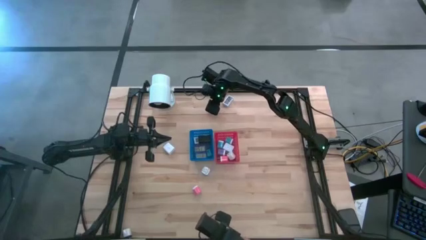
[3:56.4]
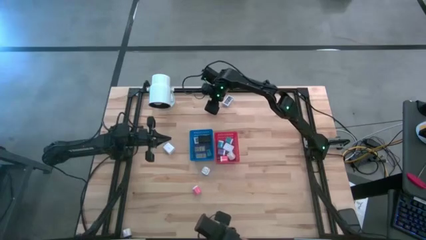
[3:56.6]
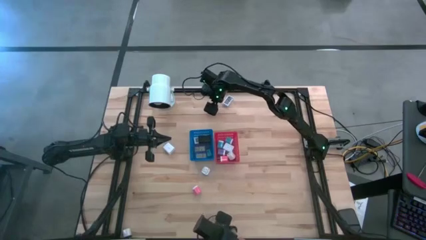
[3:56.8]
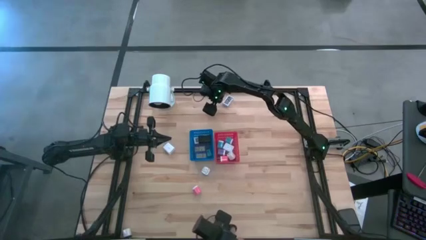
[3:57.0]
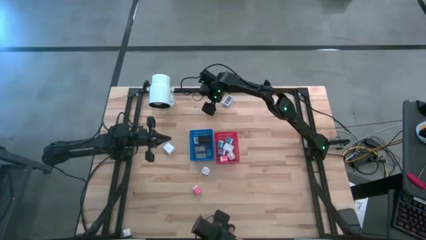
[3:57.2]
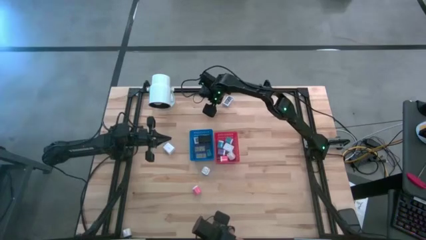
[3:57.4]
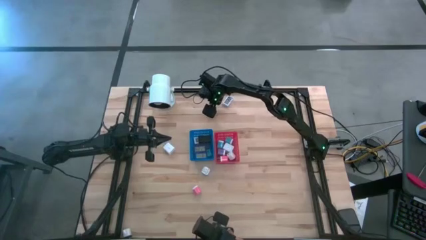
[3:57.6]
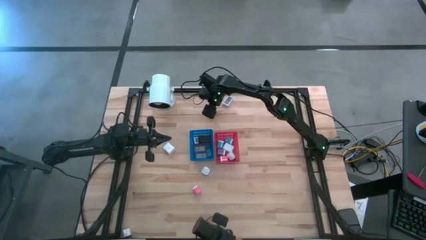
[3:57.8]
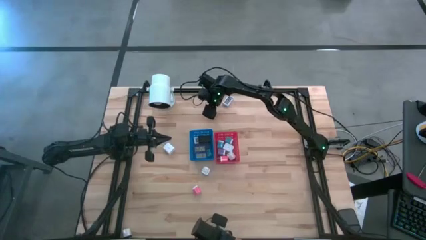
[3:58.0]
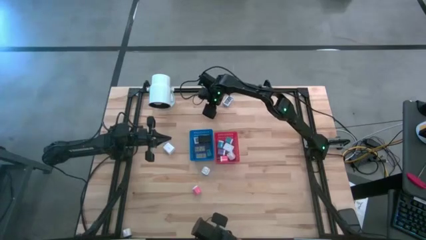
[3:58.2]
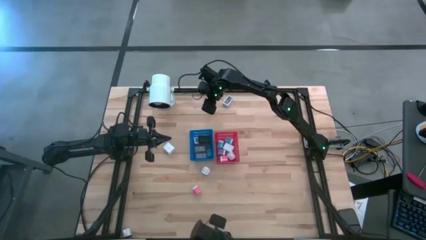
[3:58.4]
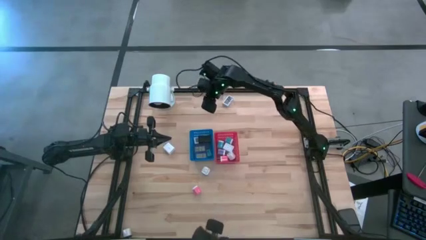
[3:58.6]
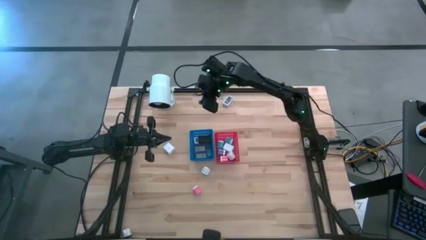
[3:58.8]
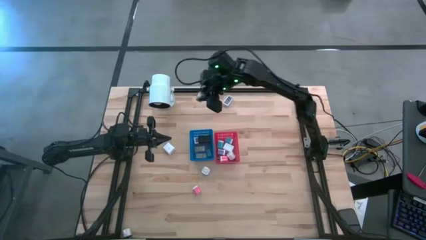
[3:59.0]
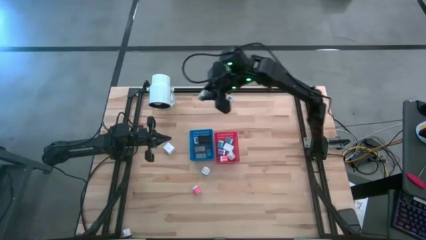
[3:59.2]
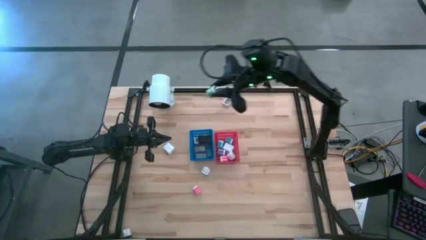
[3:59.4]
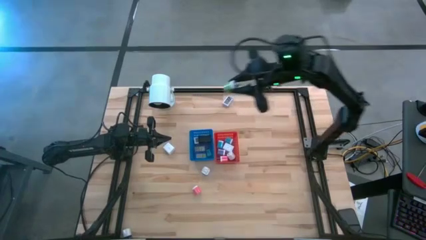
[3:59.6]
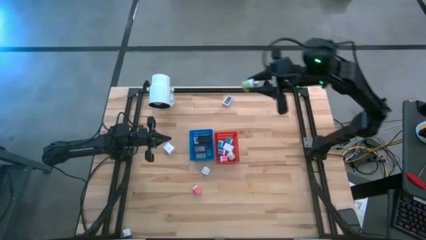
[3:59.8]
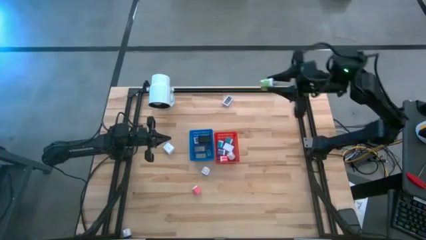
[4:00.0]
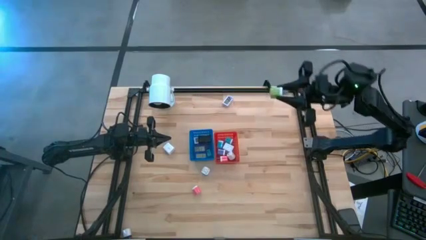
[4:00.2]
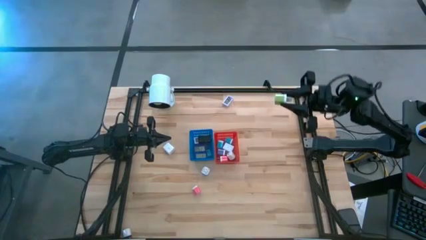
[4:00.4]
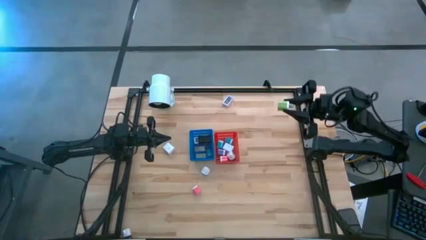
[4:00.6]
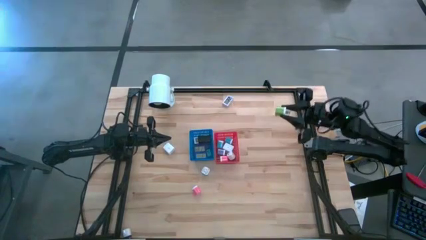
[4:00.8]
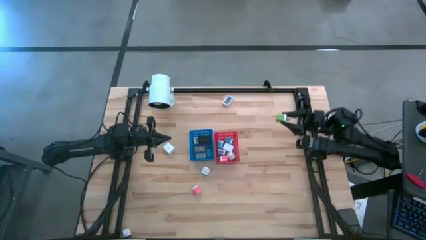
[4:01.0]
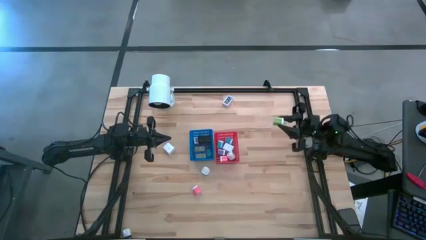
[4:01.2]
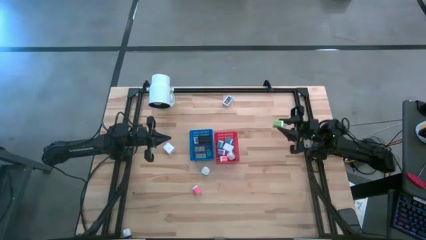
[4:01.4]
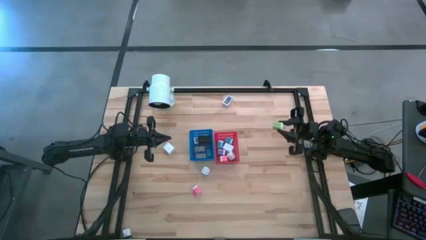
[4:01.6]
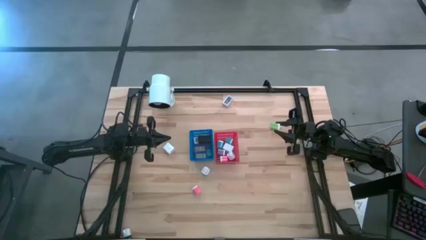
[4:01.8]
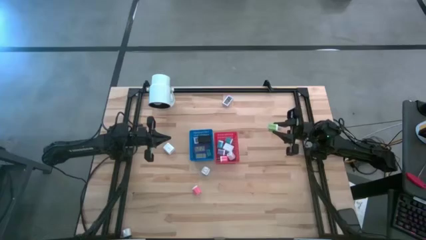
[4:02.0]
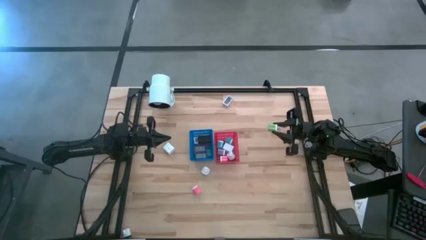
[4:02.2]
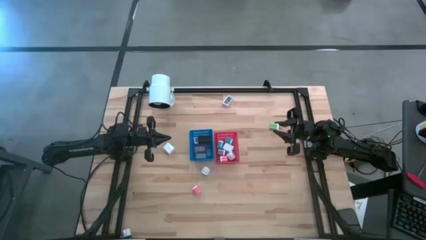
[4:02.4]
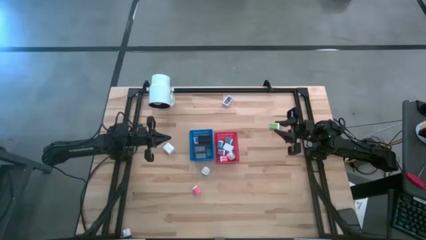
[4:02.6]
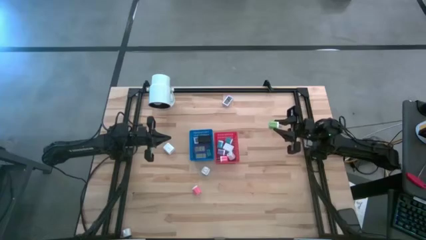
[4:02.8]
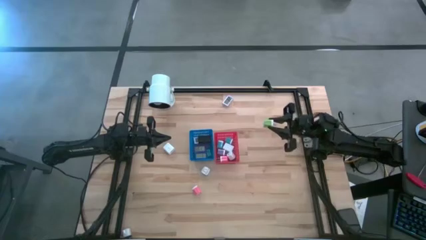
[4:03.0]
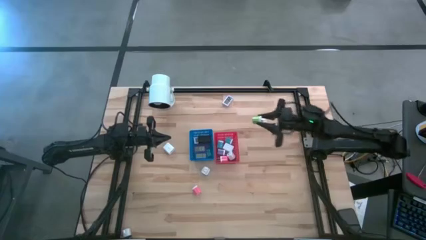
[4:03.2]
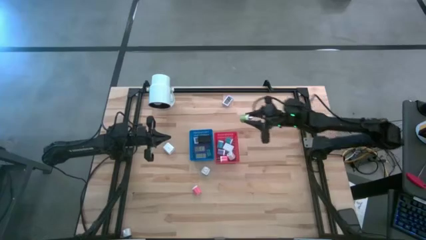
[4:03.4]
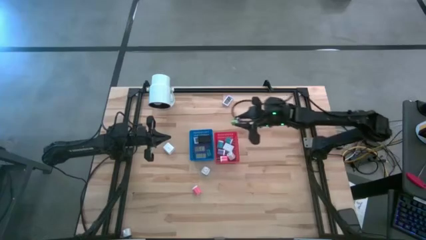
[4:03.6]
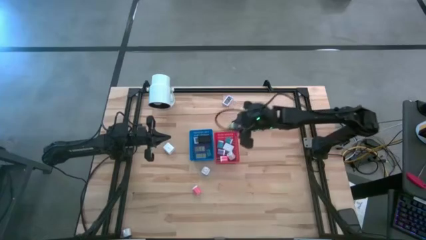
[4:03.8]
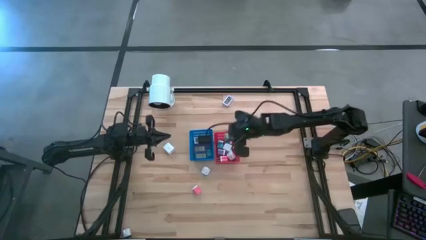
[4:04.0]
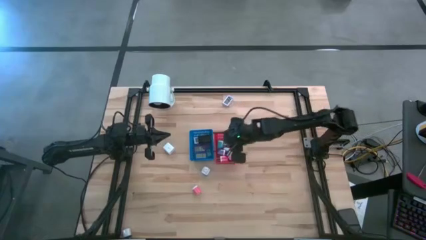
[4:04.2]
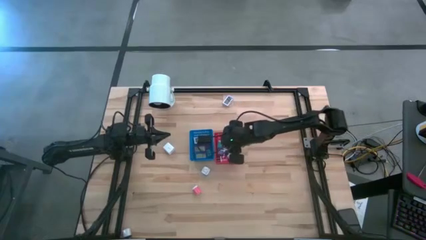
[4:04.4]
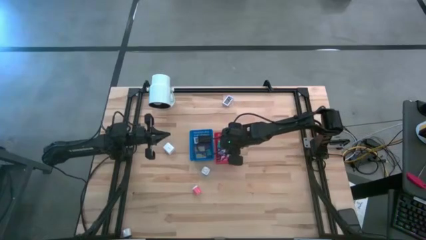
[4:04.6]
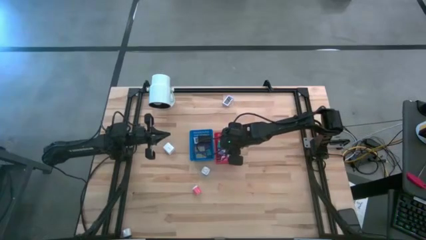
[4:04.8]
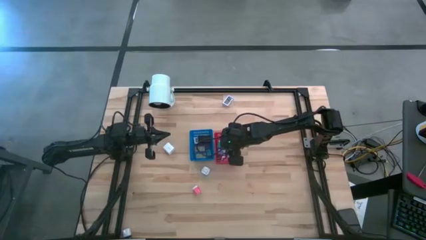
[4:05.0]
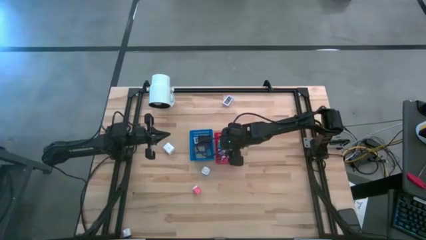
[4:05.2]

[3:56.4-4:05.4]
Task: Pick & Place Office items
Put the green charger adapter into the red bin

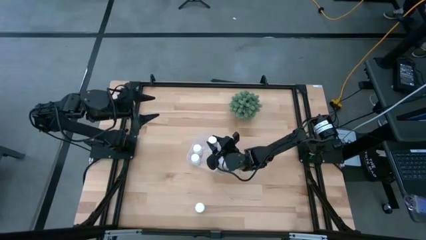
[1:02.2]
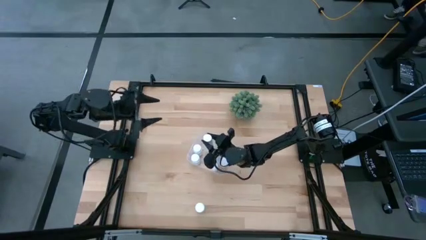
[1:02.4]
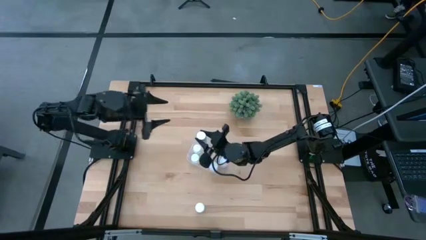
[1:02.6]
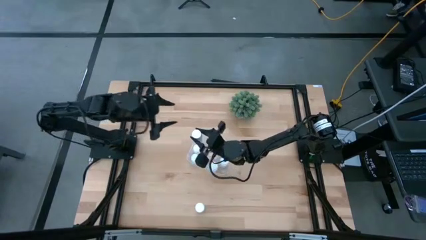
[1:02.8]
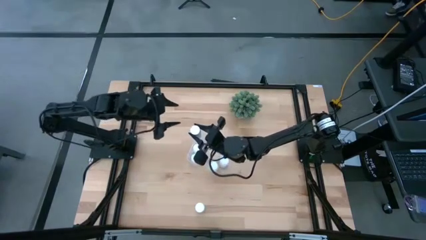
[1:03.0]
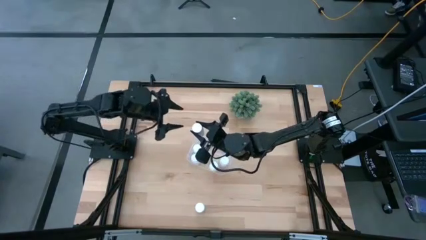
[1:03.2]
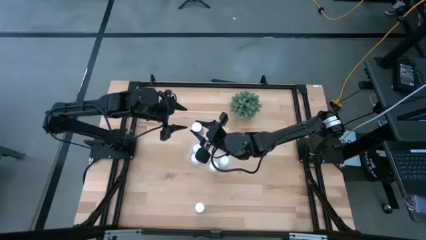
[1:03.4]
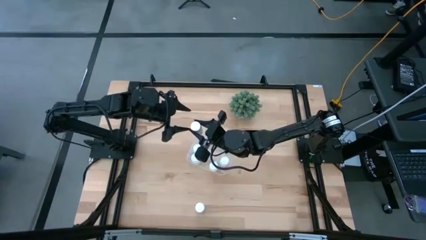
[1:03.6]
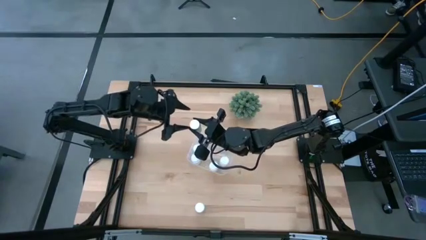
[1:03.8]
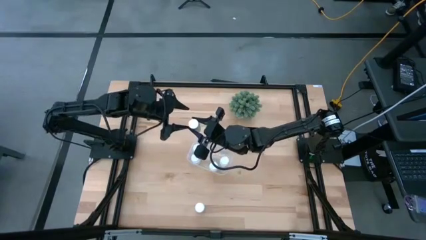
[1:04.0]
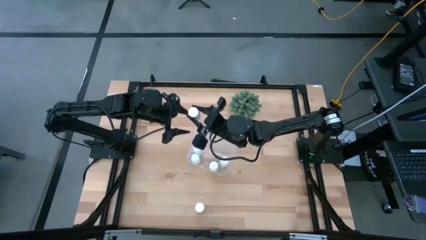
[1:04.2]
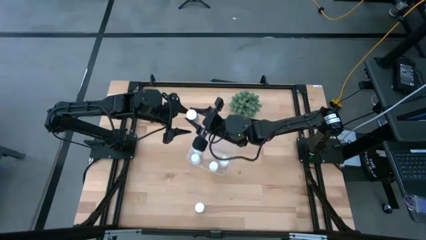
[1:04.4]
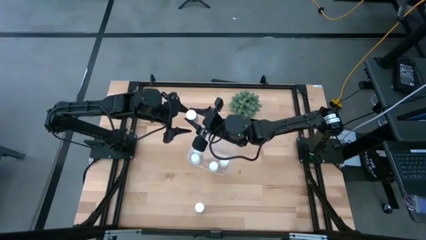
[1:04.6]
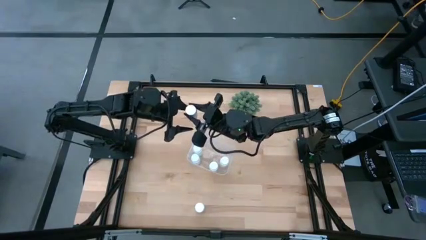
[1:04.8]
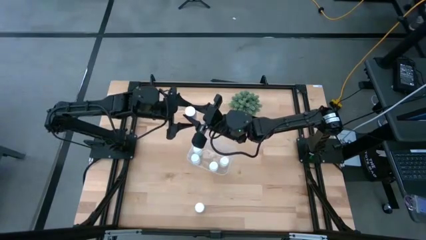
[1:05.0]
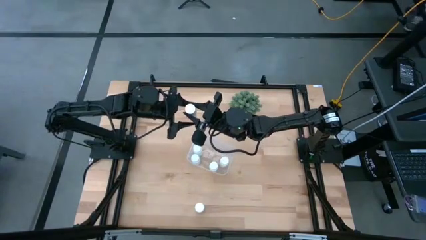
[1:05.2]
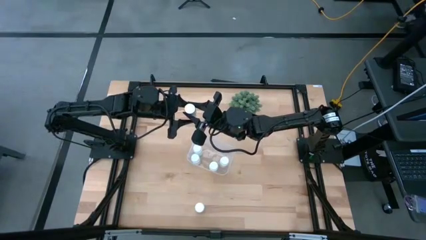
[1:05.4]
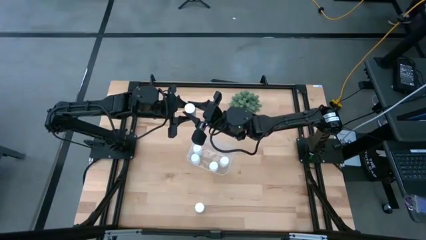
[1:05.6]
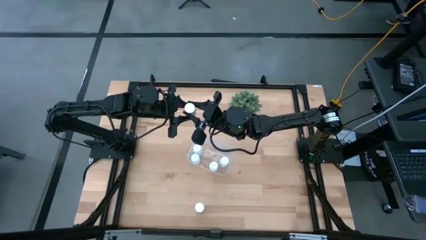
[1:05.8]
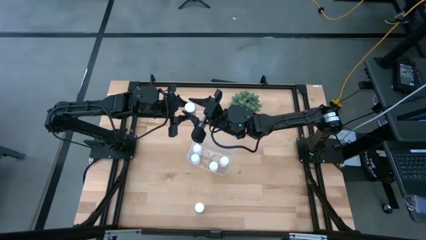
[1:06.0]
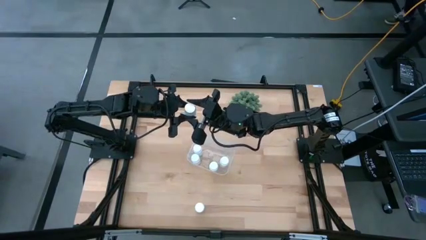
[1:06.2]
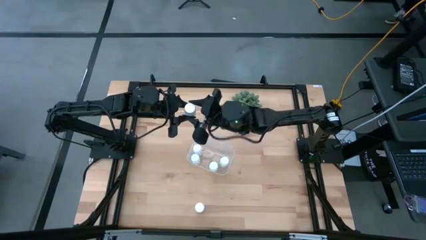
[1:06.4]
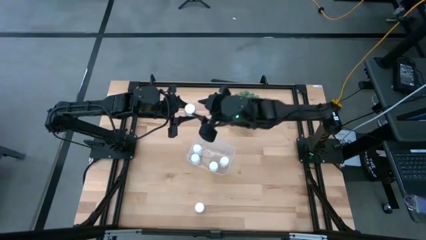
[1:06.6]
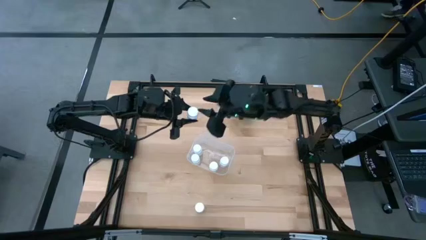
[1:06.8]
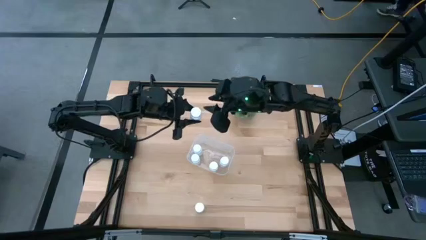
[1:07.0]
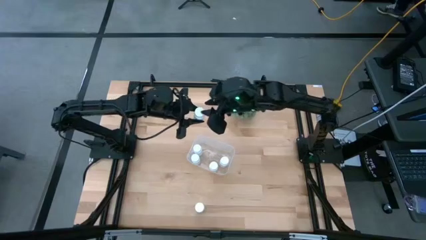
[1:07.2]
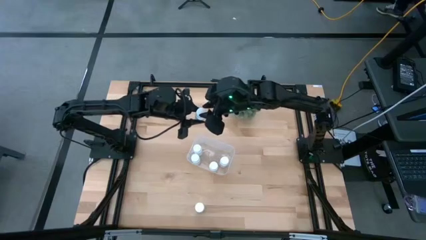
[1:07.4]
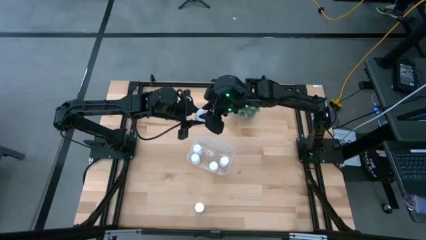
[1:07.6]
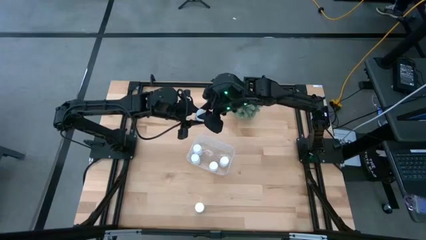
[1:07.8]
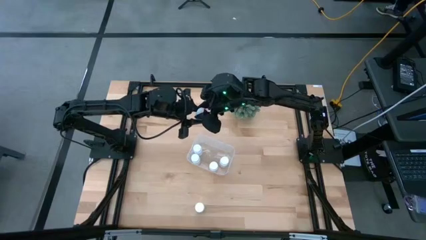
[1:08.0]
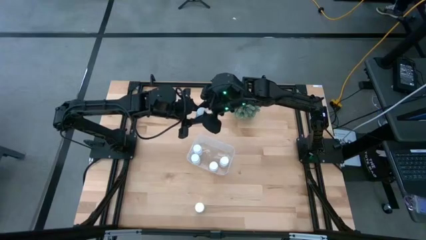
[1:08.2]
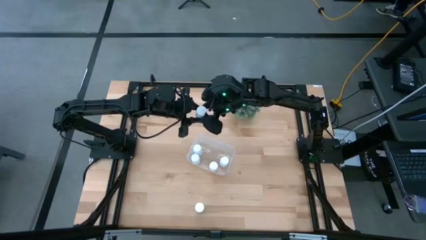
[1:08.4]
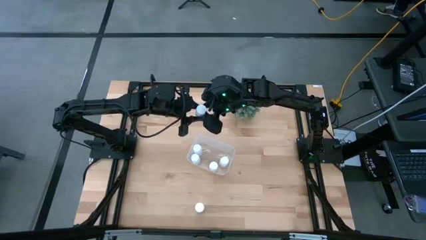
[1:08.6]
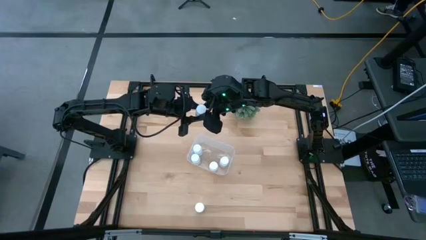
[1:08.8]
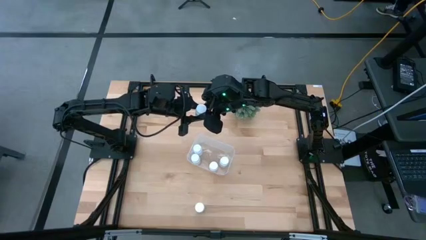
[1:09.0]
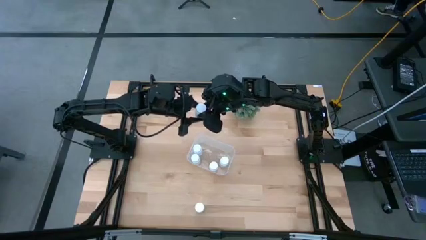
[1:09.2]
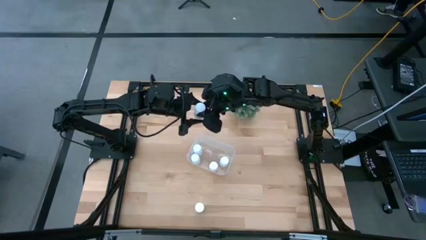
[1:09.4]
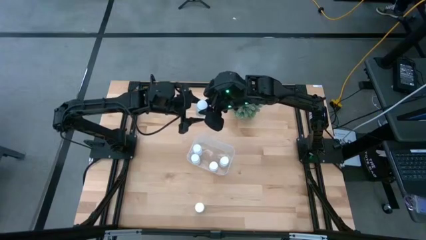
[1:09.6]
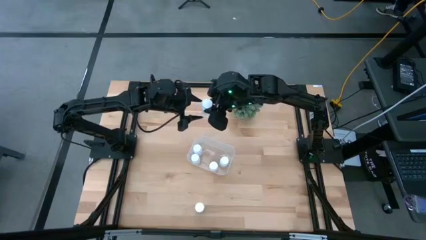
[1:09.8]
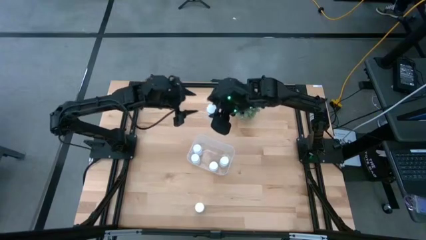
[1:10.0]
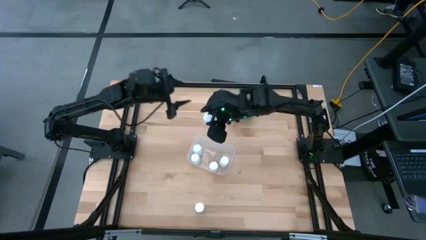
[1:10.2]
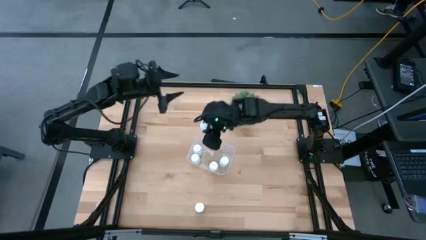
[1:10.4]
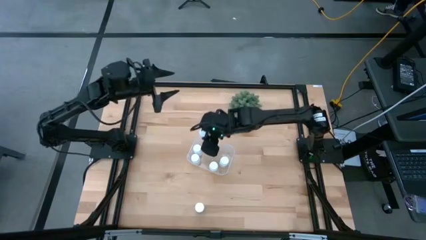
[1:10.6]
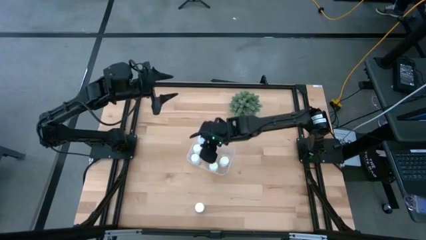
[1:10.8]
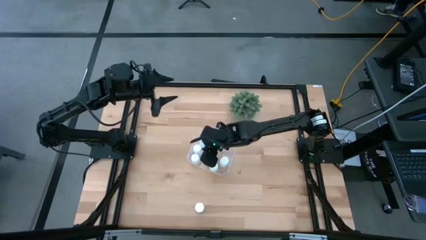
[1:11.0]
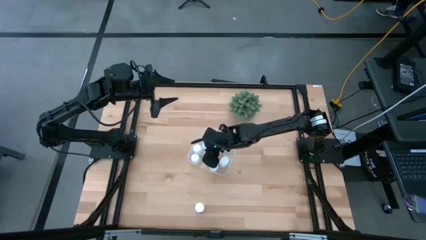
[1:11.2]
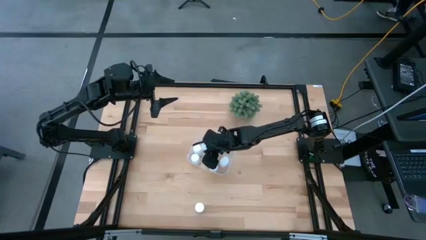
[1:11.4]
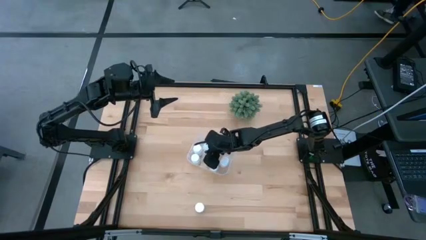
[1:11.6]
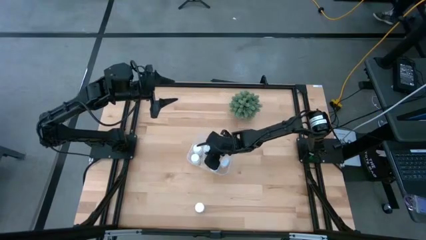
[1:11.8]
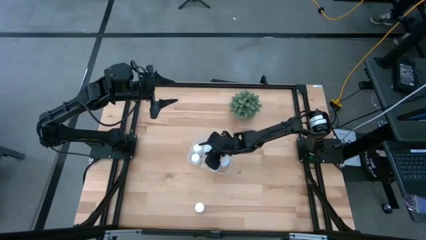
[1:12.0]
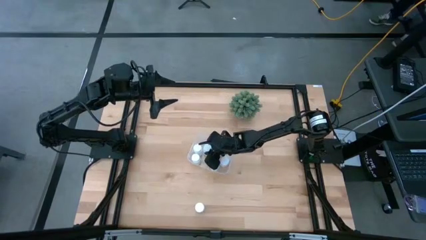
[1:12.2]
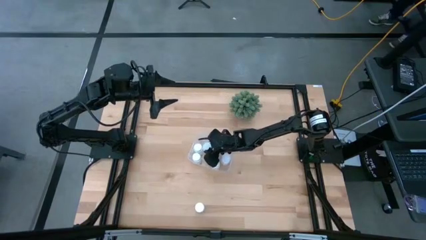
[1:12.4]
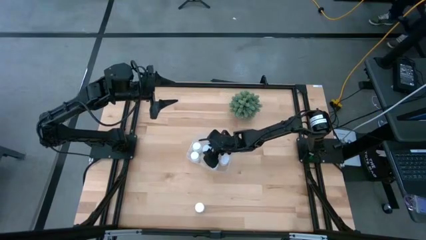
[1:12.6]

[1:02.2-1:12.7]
Task: Pick and place pill bottles into a basket
Put the white pill bottle into the transparent bin
